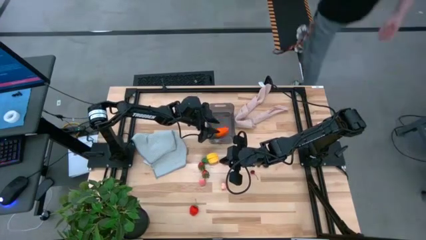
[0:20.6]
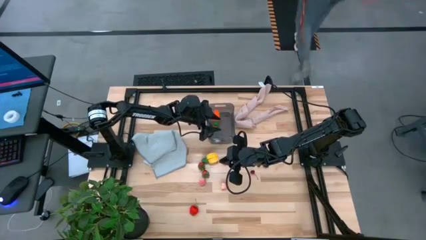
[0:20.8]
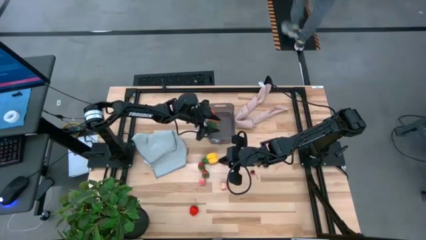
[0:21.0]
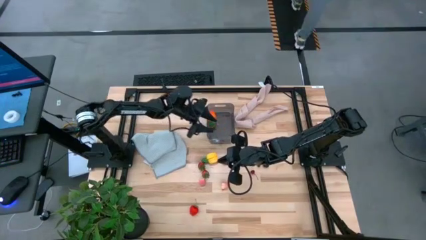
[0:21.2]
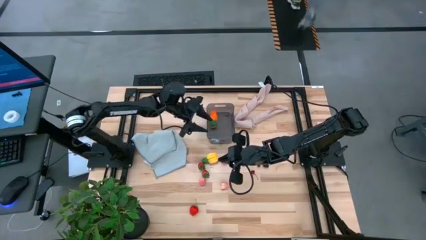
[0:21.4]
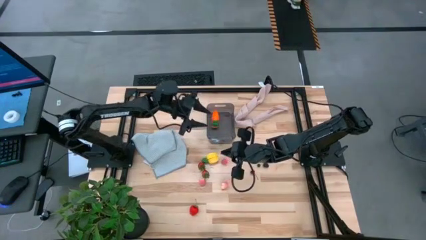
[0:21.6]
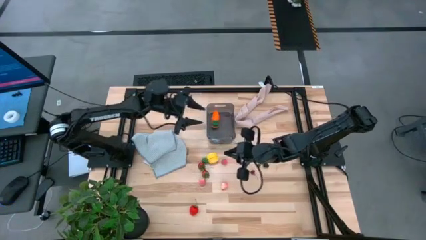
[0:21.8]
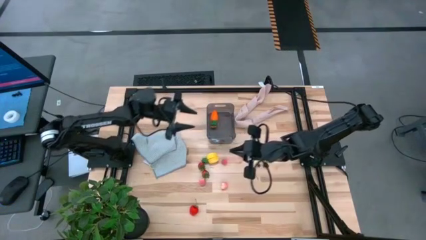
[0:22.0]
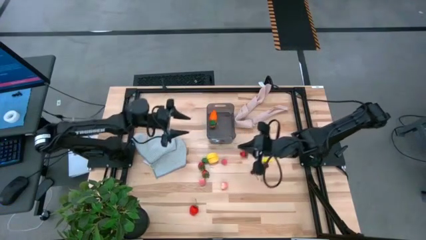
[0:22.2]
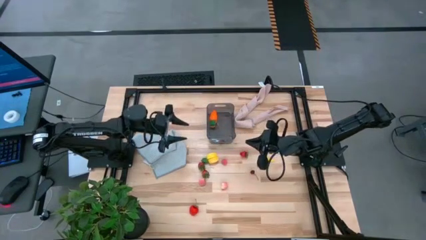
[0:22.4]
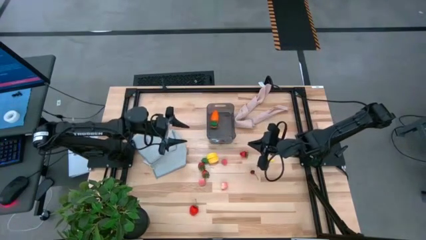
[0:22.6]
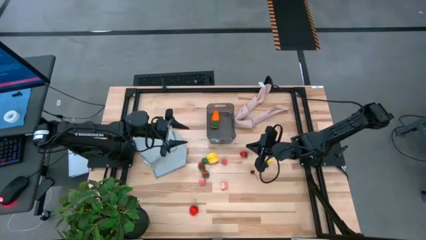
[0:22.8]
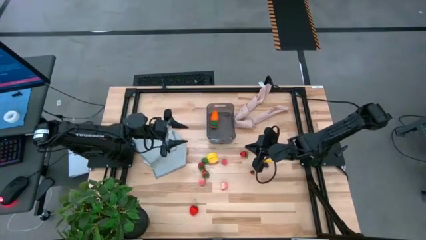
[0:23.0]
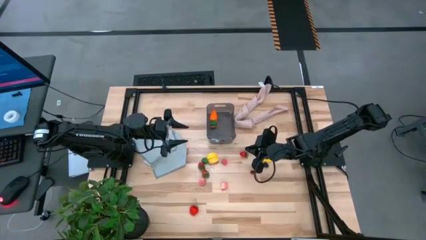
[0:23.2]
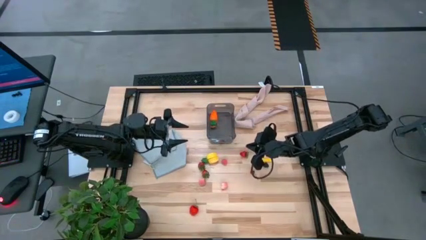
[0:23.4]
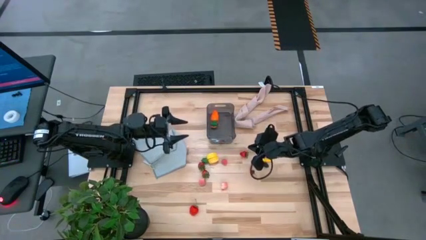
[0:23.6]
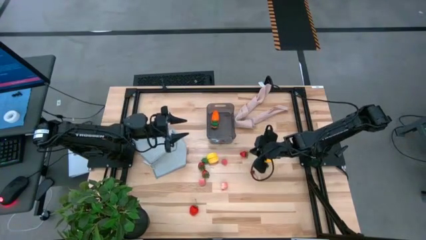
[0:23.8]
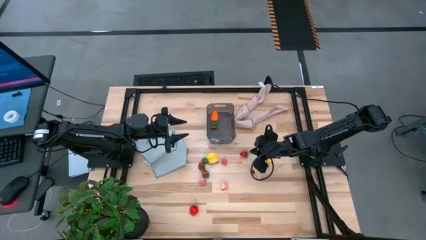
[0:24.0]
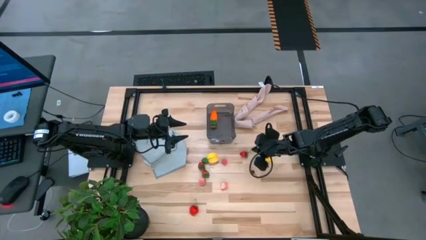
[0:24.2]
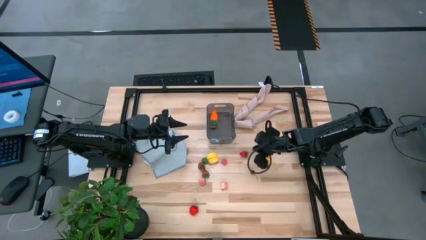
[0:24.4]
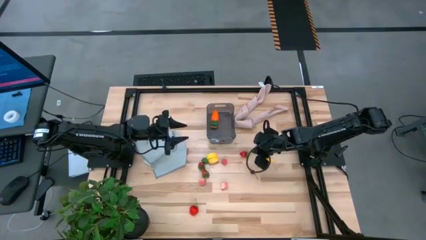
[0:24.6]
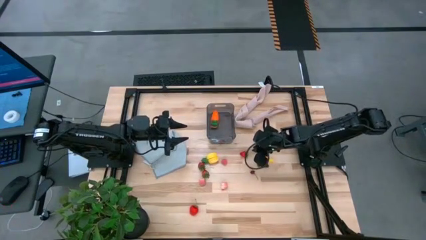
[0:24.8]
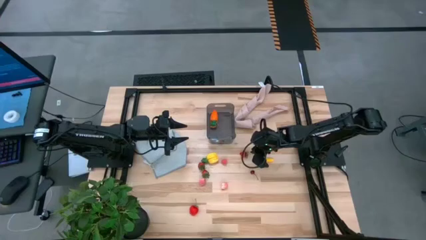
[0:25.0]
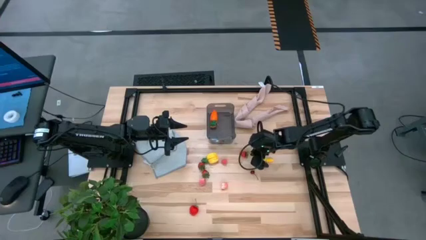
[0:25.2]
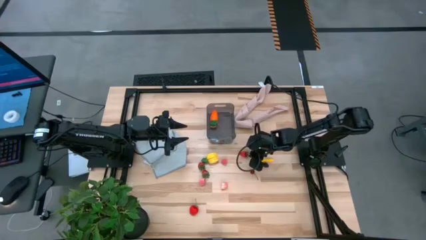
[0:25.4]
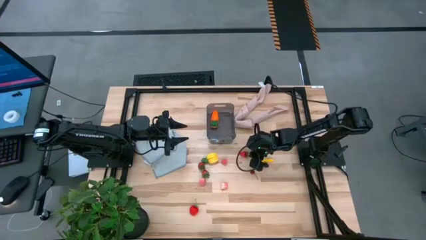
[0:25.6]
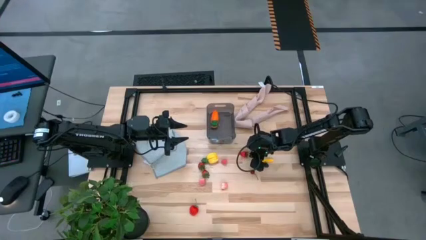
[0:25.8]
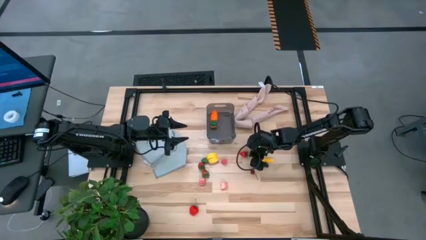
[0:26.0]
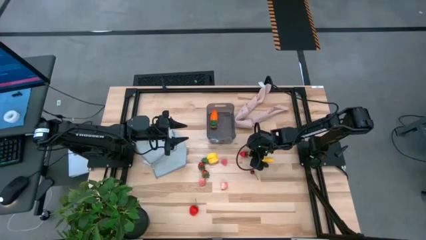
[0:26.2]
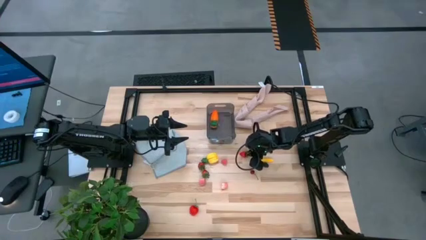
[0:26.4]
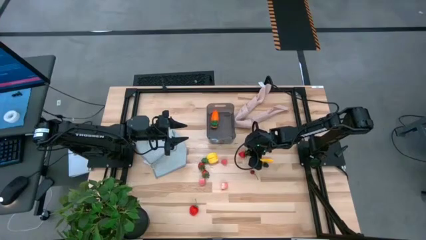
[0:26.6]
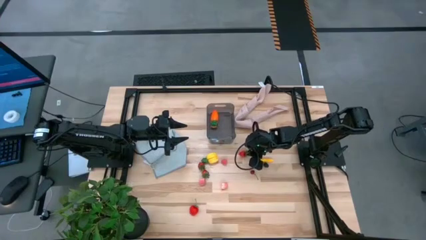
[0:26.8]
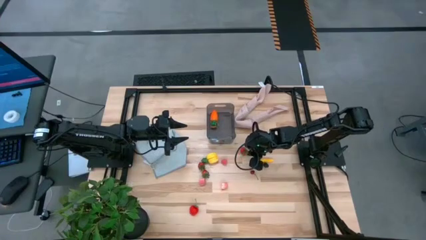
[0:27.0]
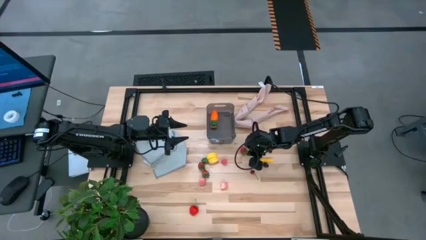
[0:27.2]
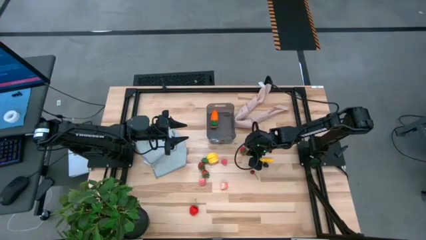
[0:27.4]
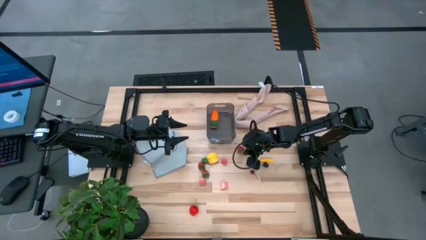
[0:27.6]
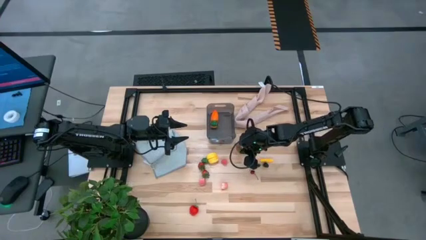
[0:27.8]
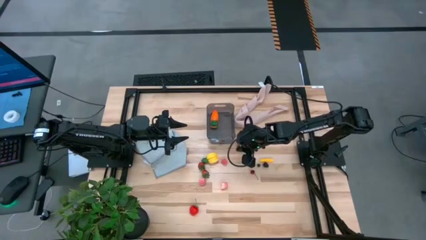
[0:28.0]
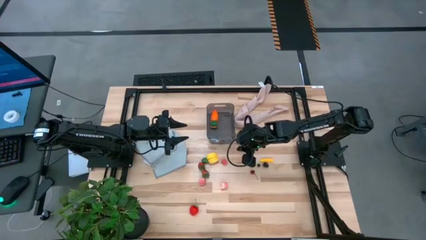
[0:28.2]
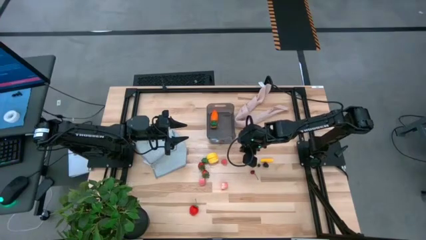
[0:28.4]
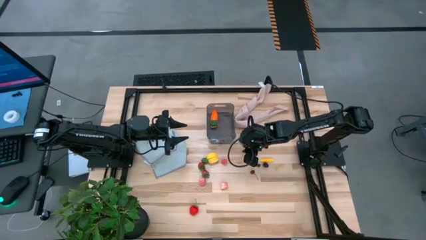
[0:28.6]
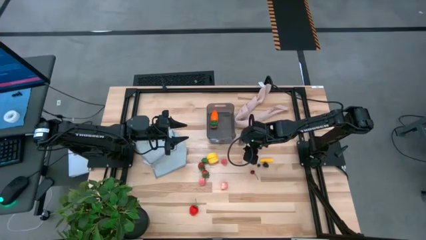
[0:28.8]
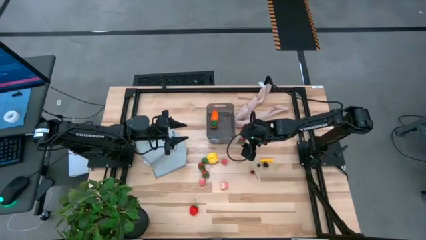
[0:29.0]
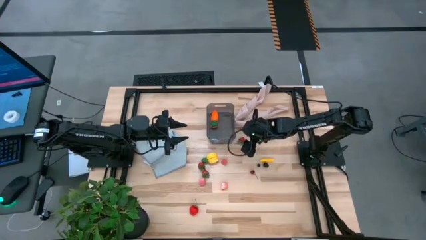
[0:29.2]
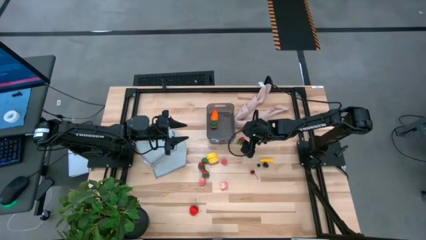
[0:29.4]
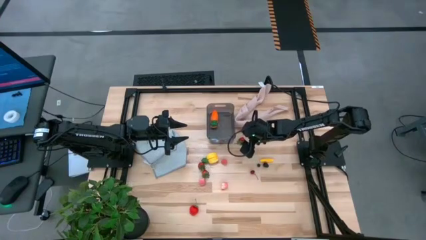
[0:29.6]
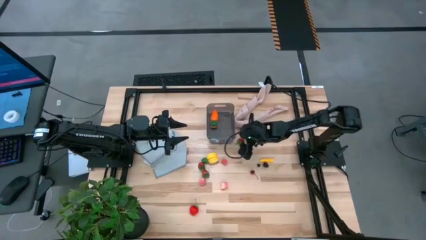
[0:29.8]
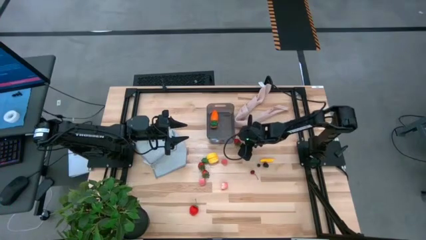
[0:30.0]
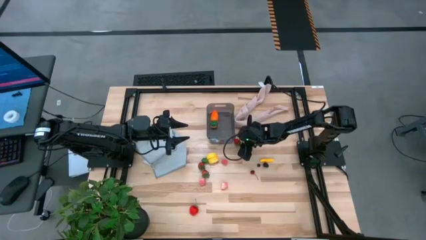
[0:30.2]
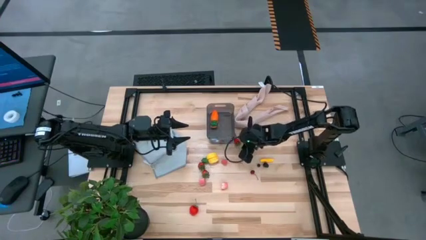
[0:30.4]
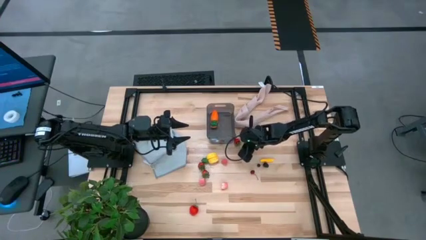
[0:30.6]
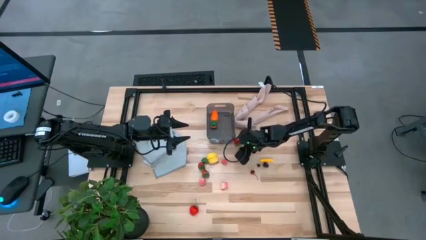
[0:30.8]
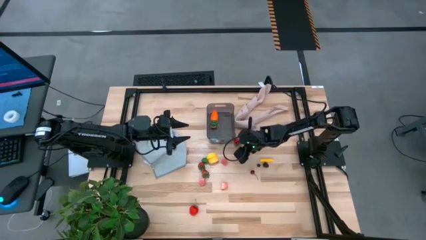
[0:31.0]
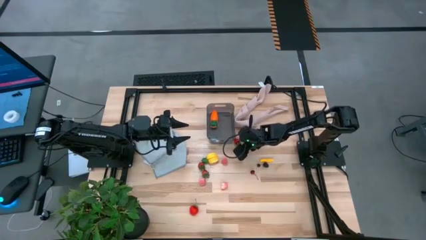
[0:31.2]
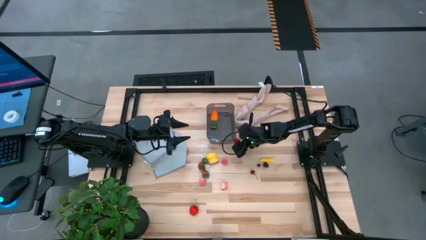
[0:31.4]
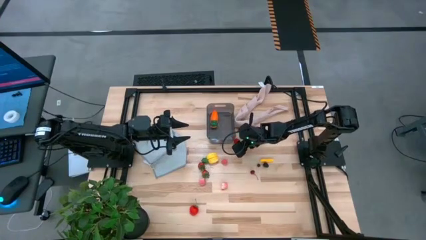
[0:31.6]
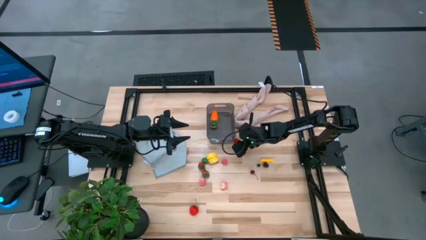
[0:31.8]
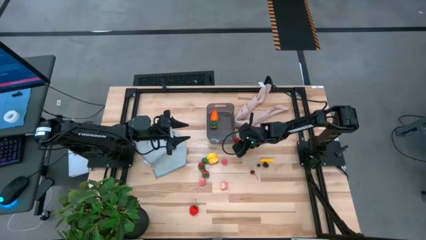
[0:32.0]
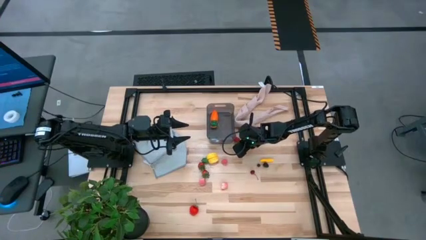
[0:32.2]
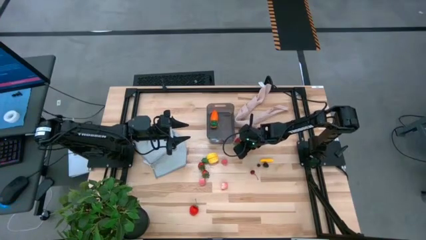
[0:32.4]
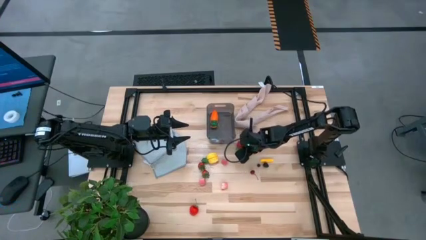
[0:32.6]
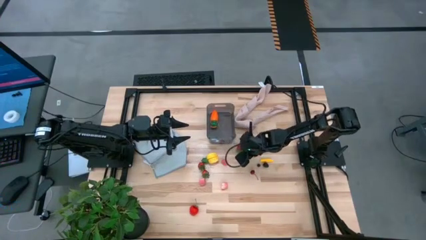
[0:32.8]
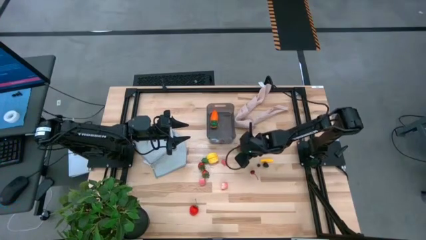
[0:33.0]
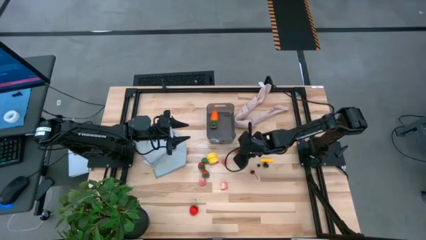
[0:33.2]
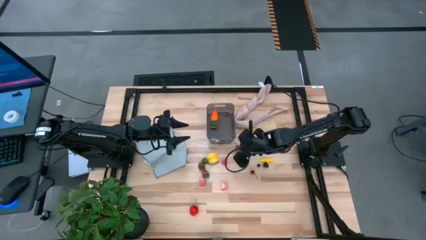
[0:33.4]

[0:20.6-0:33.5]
Task: Pick and placing Produce into tupperware
Put the red strawberry into the black bin

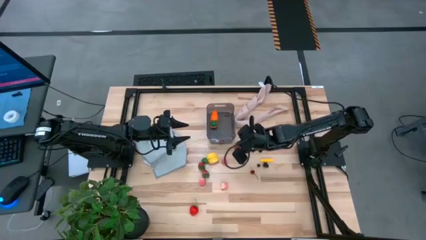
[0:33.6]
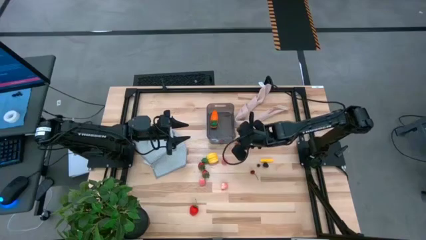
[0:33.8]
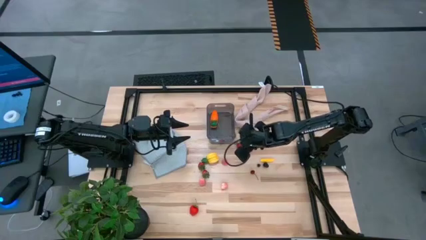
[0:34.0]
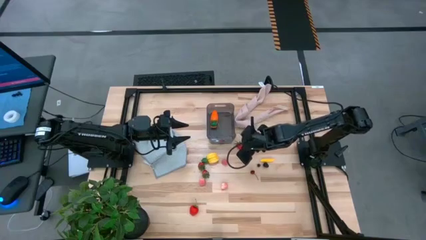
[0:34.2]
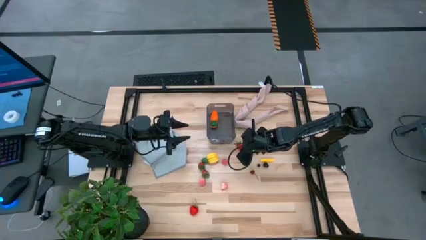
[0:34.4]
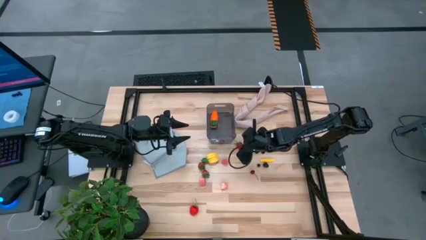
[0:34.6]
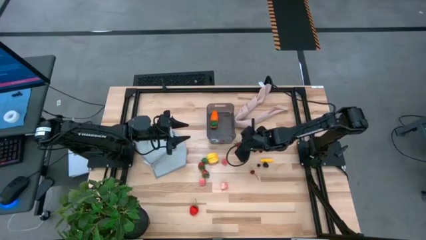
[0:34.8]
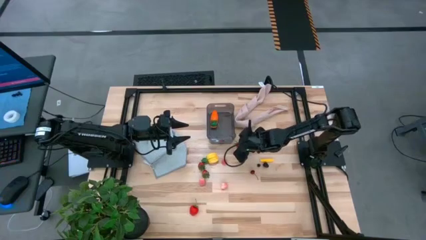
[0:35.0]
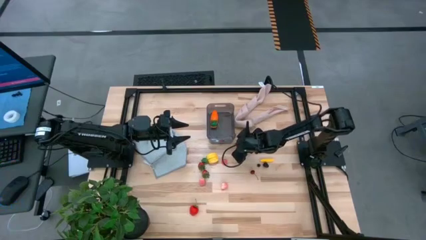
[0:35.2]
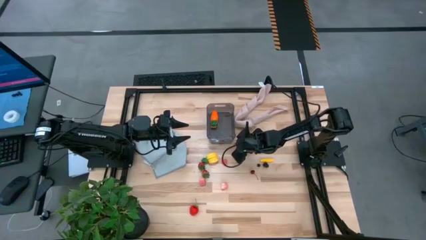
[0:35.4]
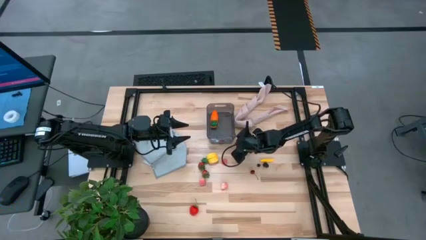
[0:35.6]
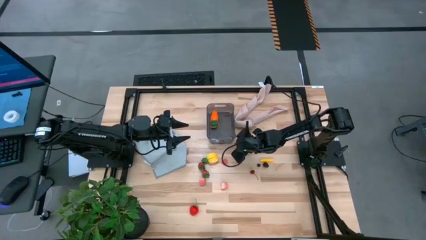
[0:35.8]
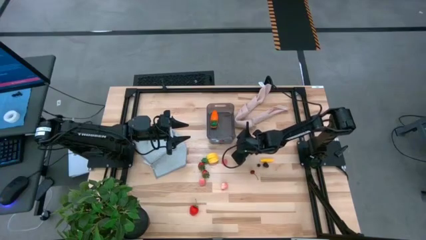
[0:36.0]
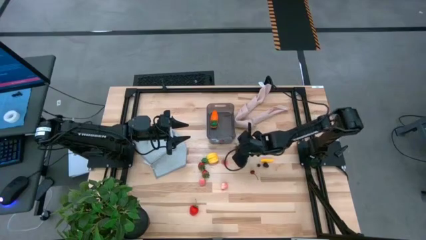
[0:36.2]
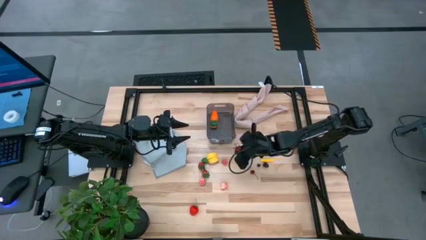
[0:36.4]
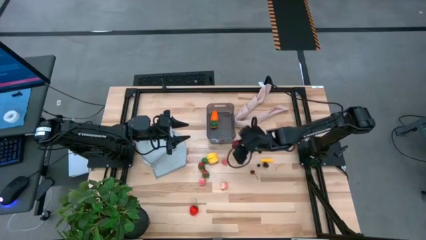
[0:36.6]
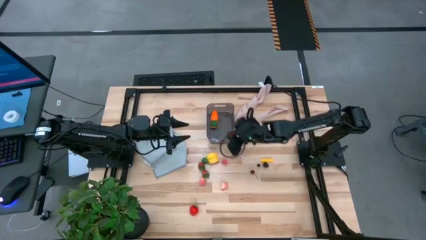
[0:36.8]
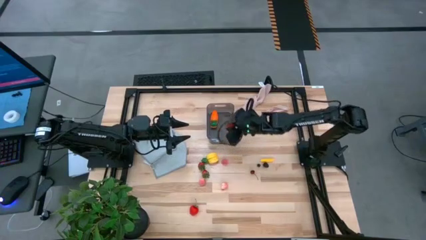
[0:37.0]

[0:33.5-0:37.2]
Put the red strawberry into the black bin

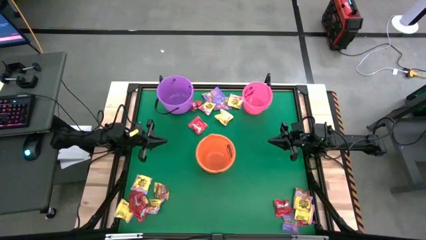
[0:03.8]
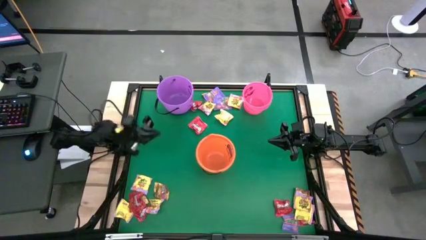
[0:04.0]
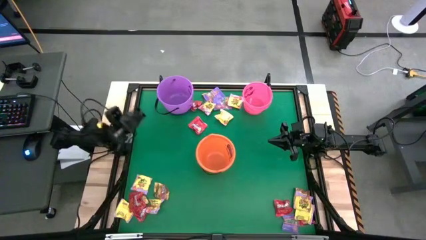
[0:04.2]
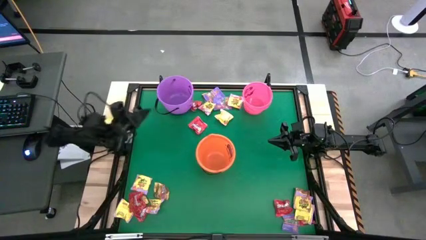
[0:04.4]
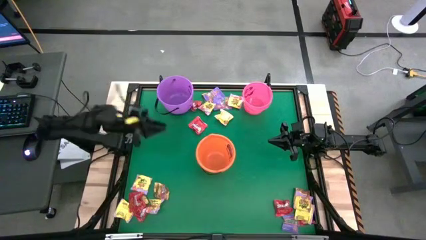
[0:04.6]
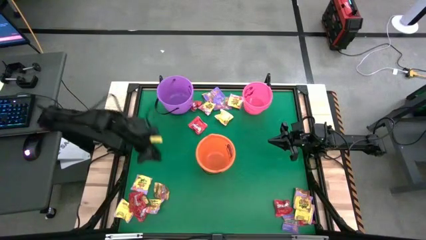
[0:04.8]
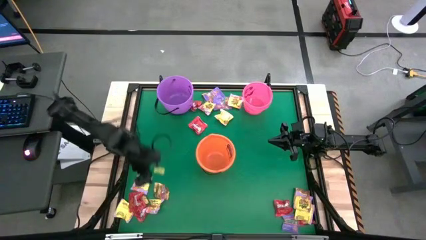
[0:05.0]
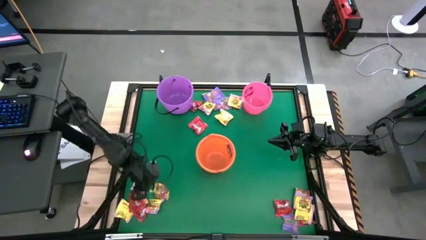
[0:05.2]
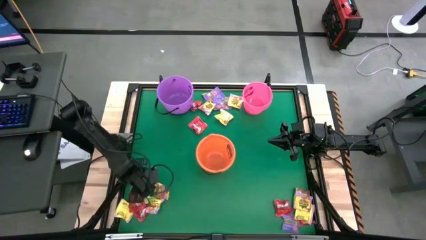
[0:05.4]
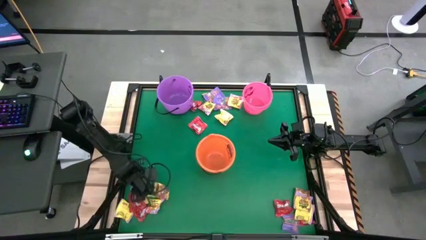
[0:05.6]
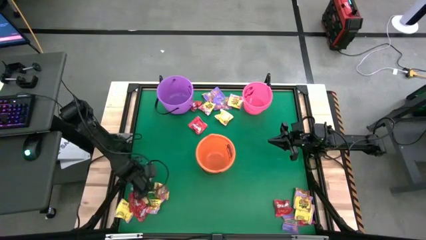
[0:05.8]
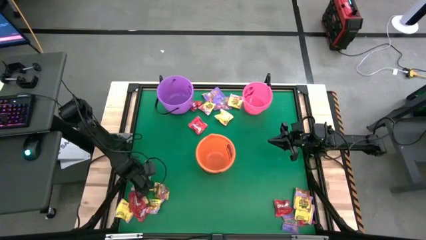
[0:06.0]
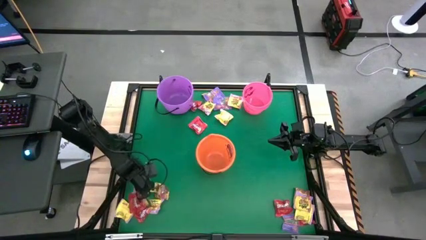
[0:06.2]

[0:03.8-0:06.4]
Task: Sort candy by brand, put in halloween buckets
Put the yellow candy into the light violet bucket
